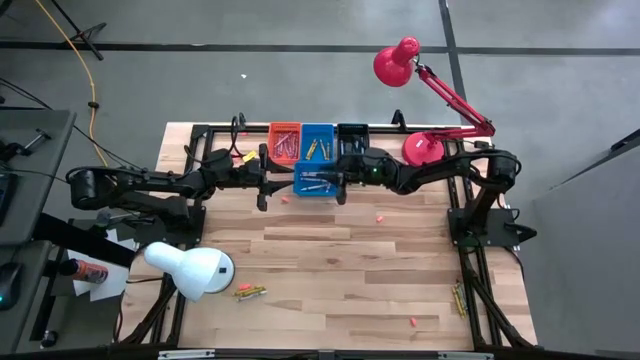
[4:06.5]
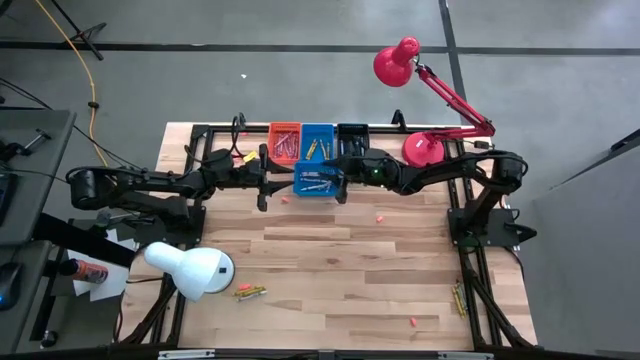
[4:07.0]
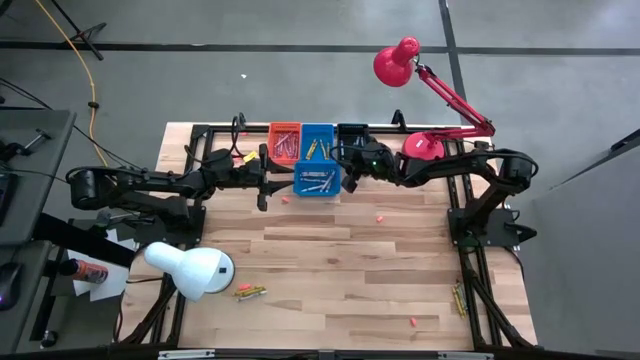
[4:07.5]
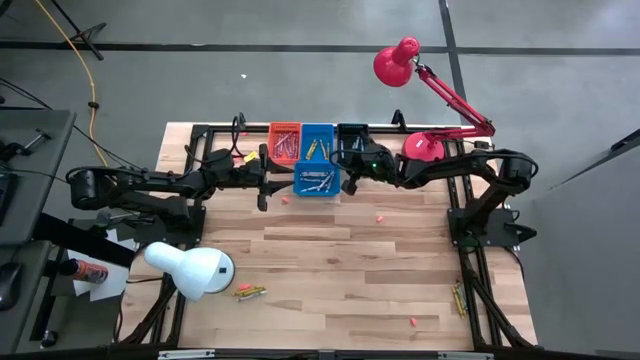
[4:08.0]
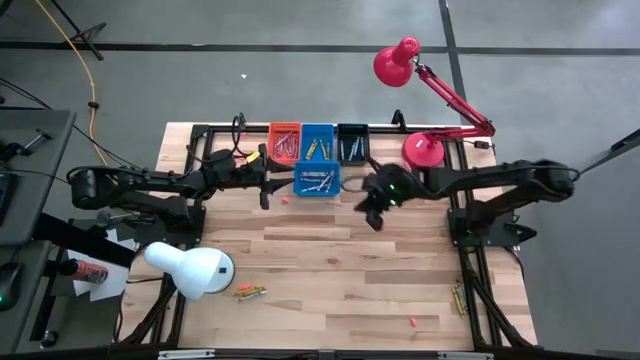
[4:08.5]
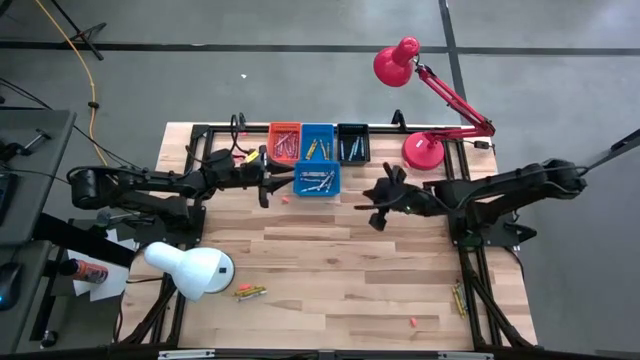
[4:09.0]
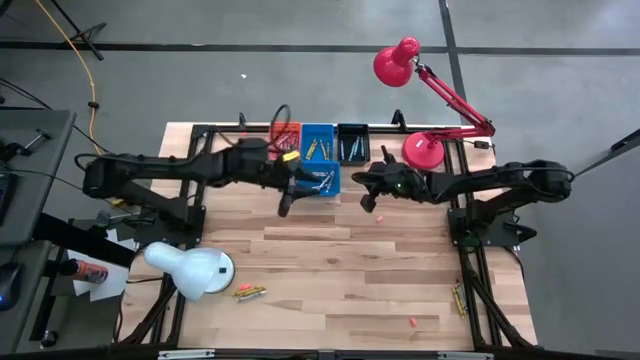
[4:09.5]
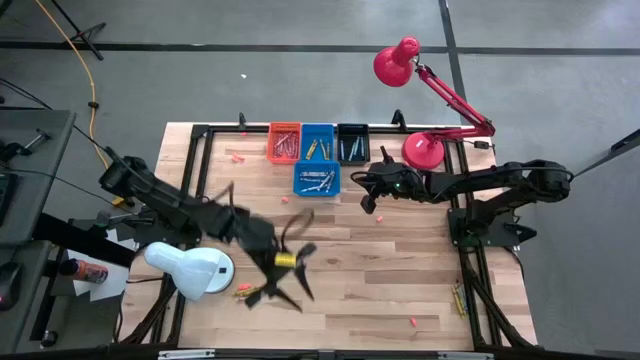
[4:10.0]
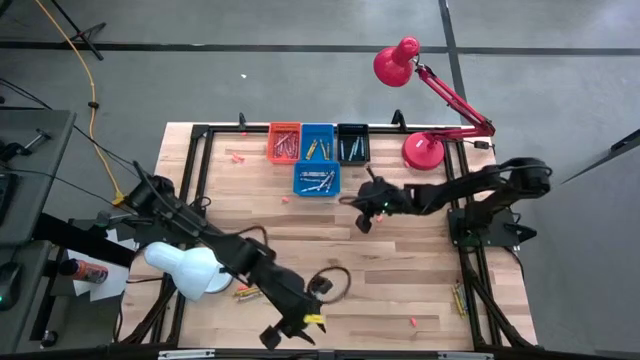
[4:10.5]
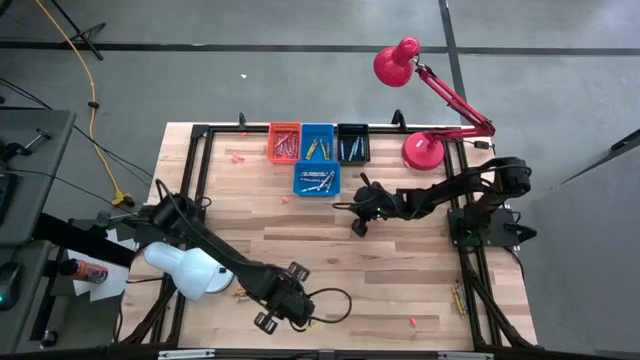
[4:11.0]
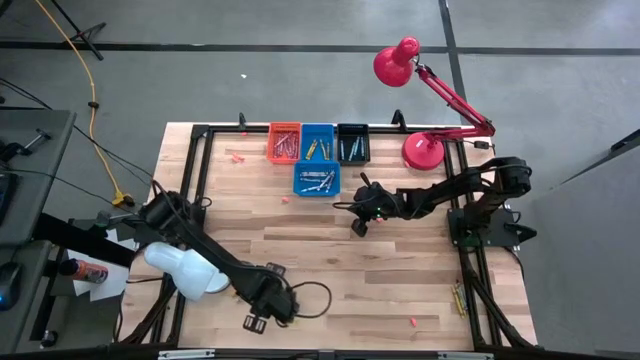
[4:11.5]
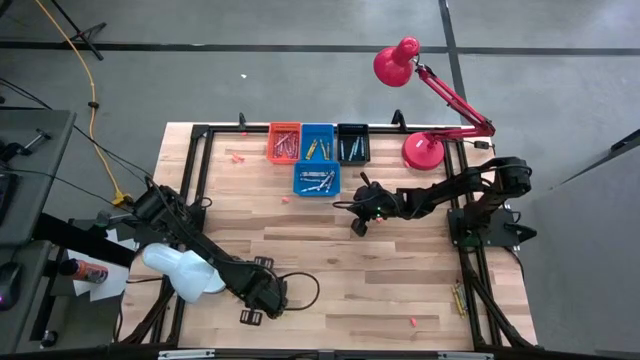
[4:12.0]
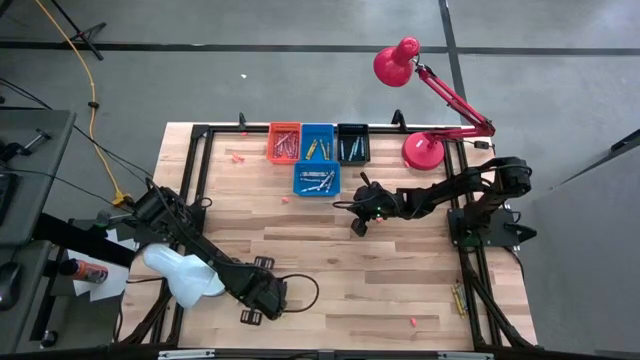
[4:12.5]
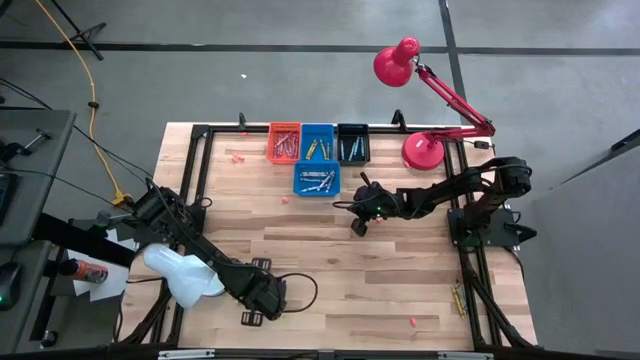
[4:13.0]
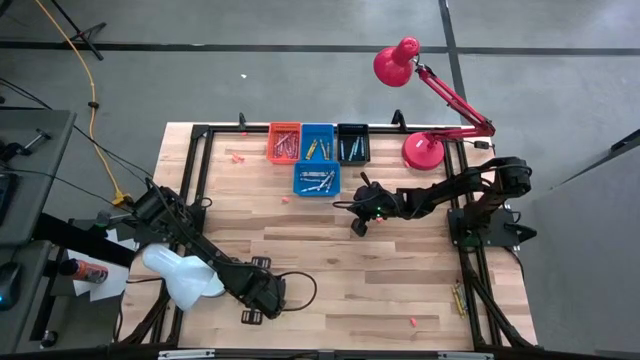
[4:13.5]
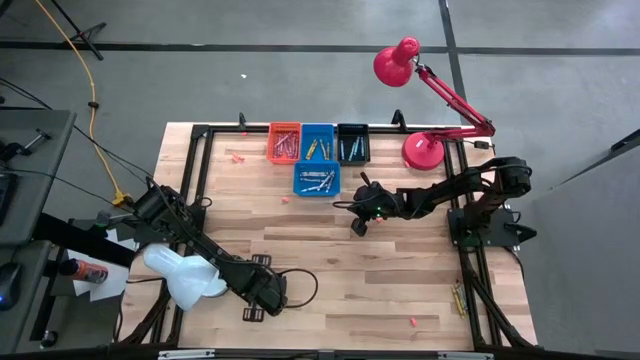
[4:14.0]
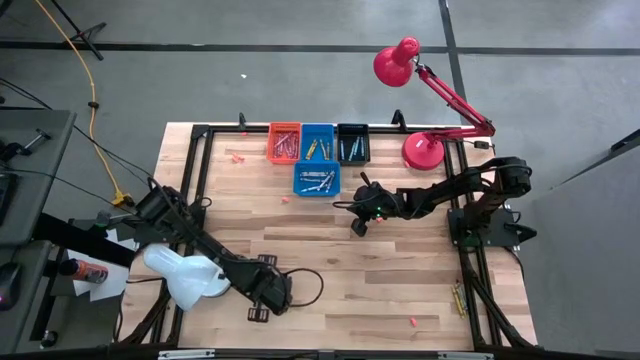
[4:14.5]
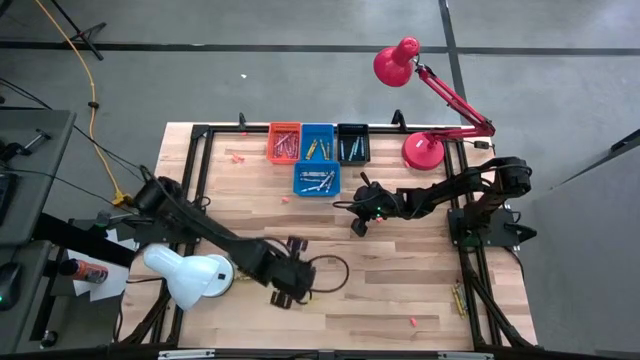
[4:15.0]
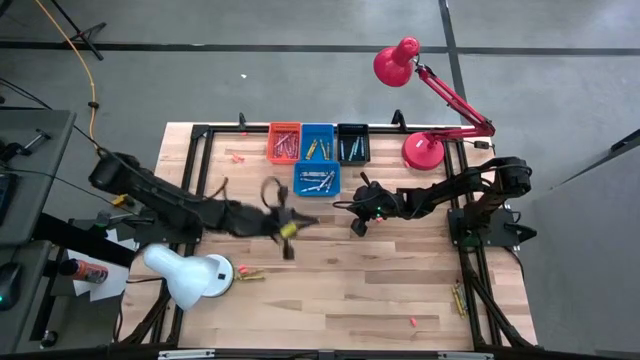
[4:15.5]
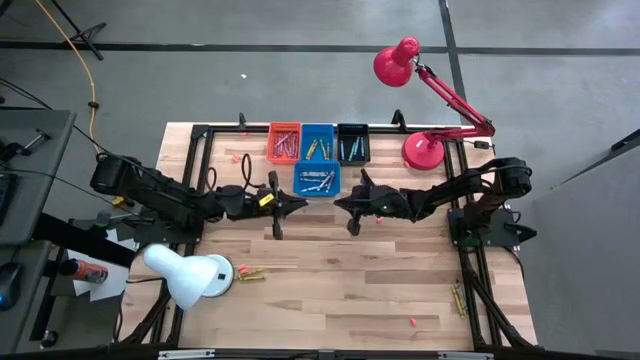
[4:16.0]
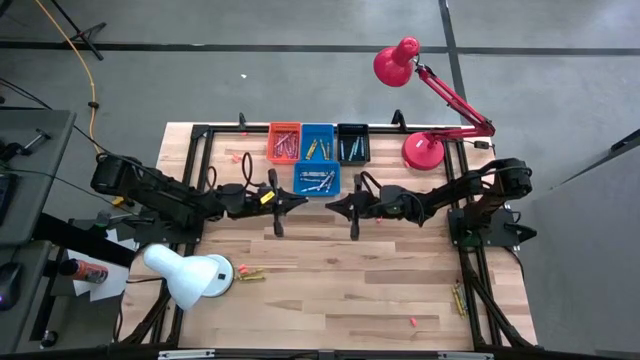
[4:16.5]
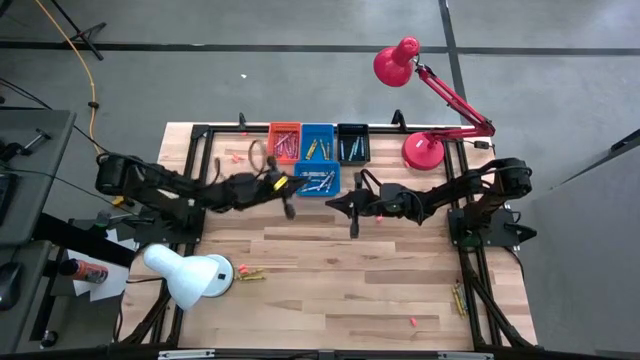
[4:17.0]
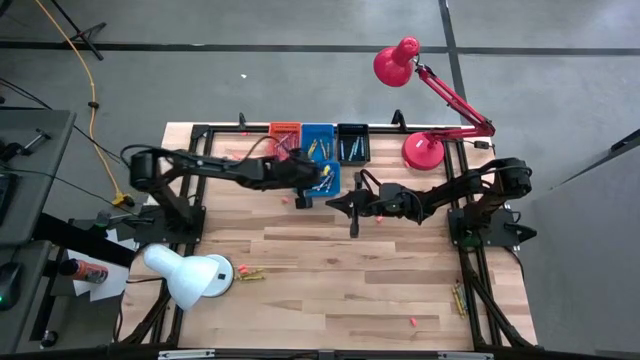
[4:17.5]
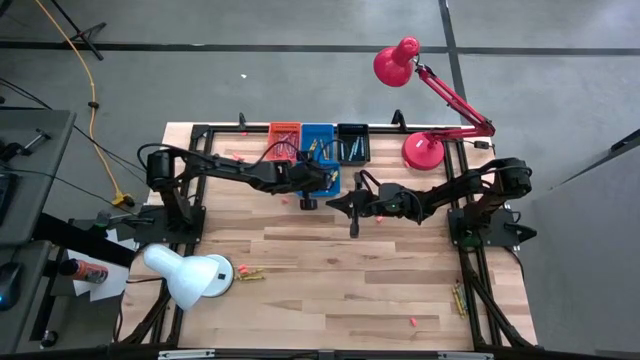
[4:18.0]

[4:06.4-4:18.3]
Task: Sort crayons
Put the white crayon into the bottom blue bin

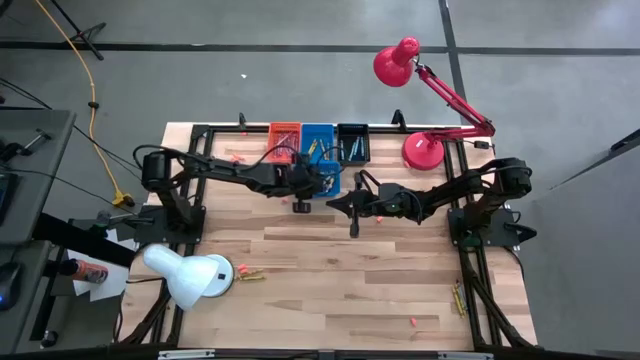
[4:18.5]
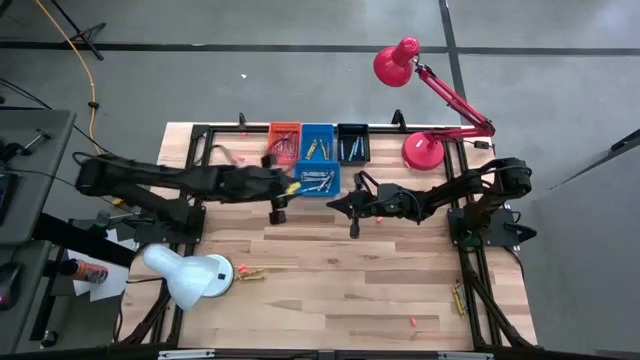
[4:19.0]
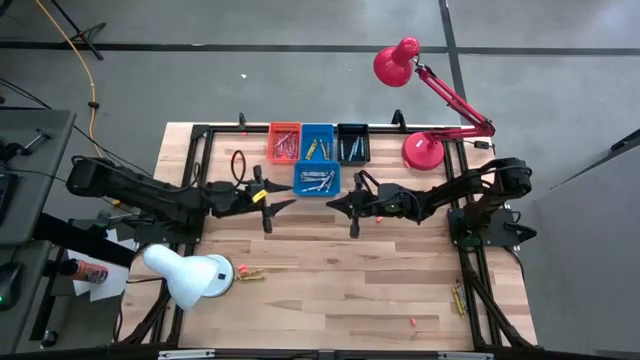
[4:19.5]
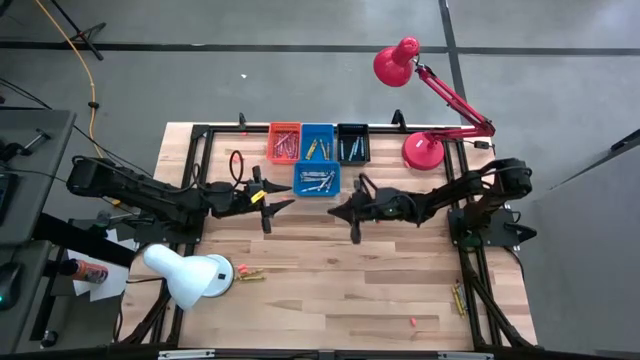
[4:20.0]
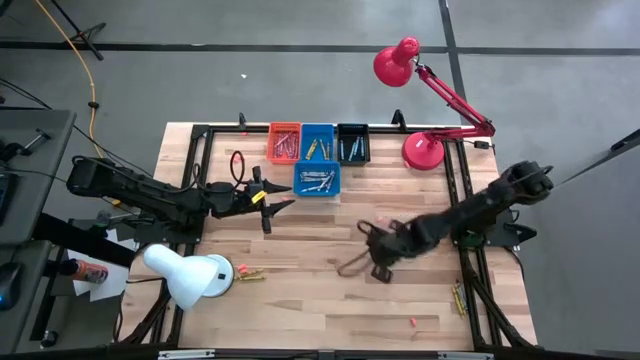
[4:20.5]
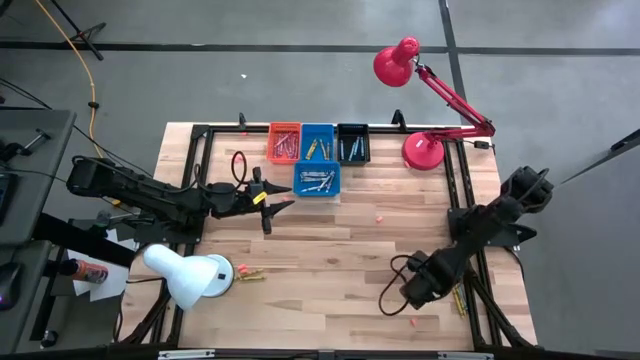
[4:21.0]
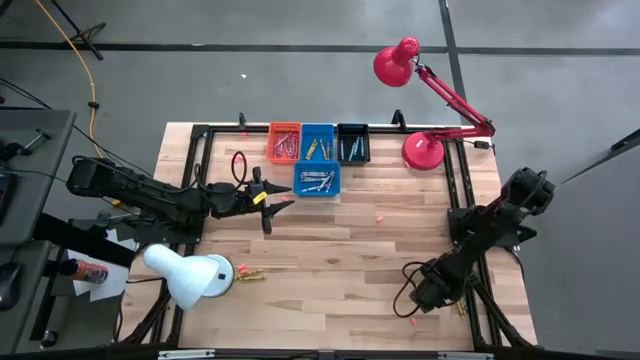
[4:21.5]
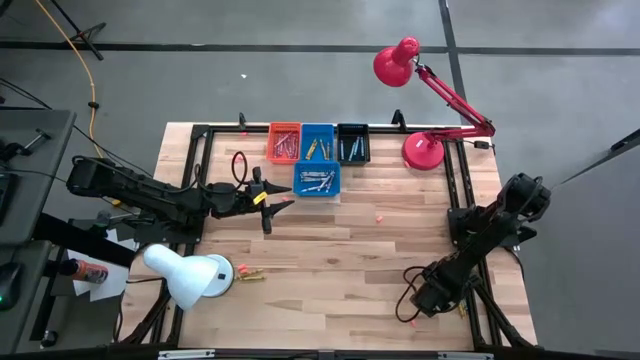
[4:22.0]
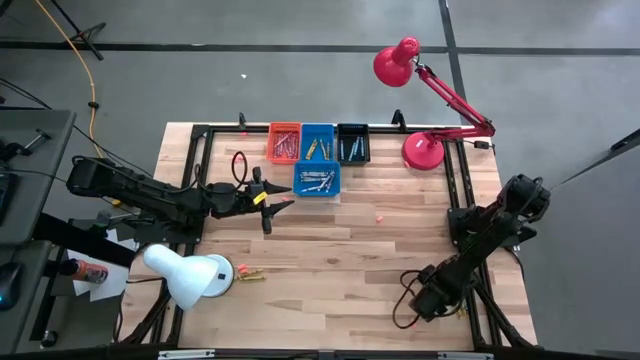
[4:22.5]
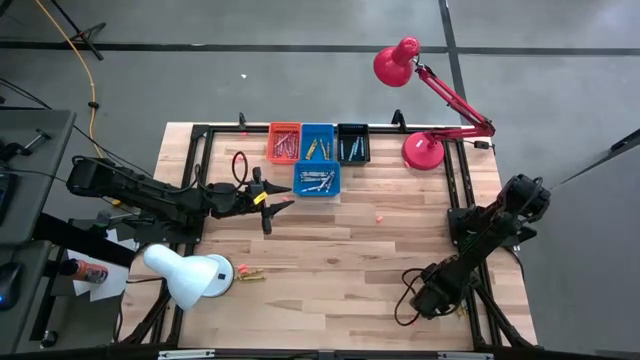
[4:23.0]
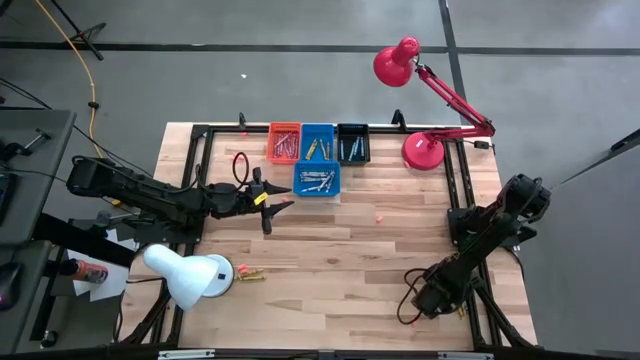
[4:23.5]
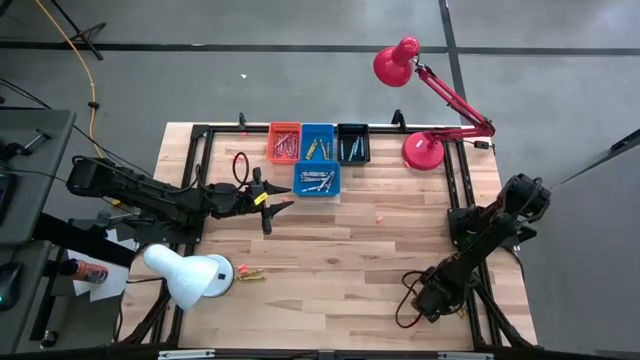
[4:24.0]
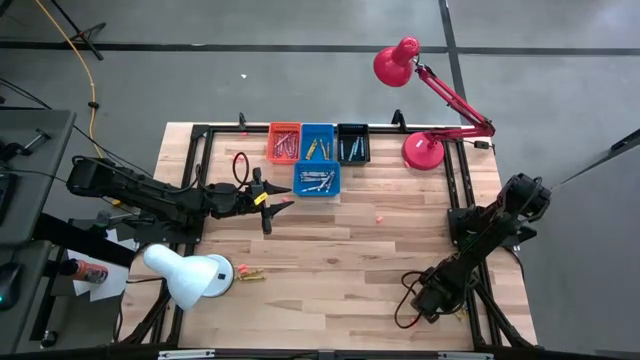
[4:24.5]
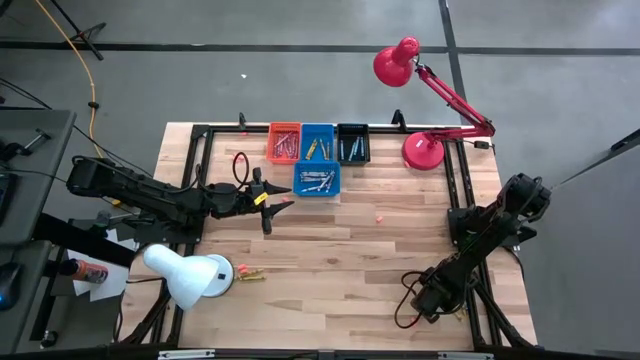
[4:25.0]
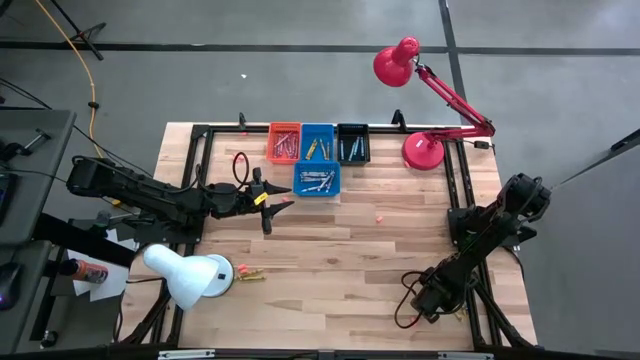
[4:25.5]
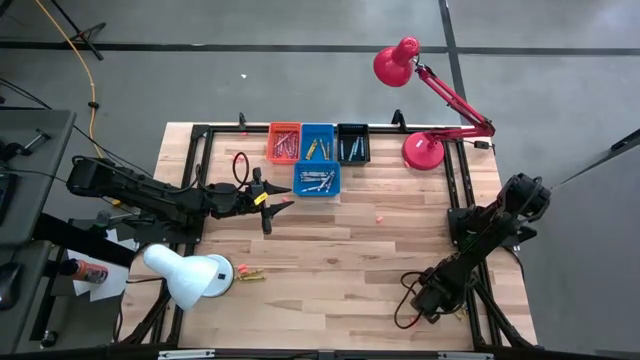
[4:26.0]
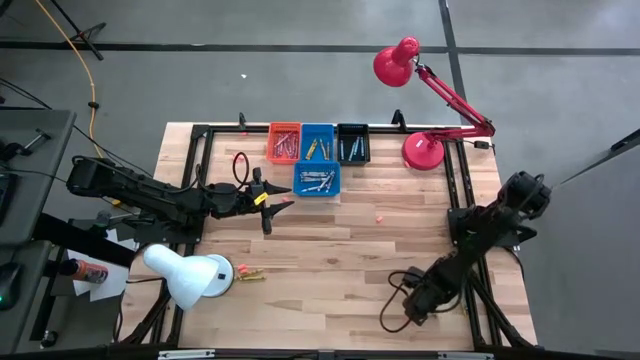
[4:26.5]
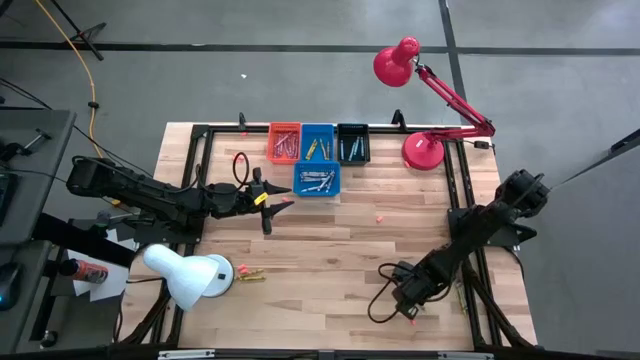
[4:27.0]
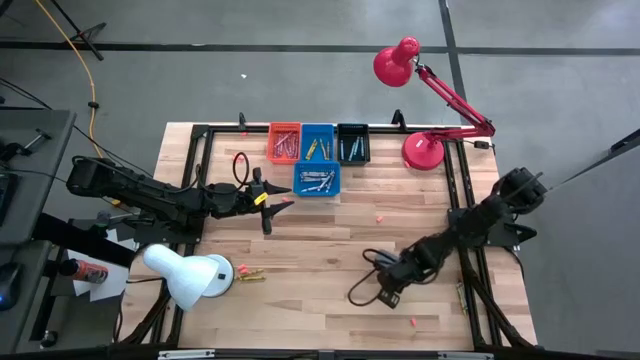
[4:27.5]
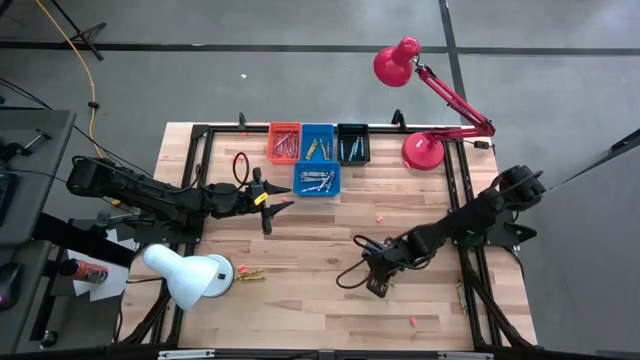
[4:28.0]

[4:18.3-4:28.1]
Put the yellow crayon into the top blue bin
